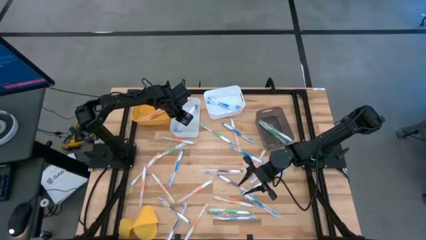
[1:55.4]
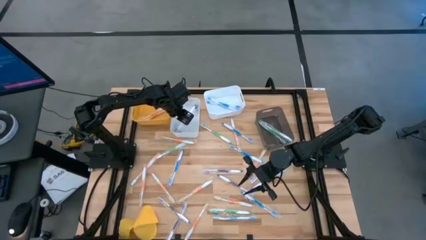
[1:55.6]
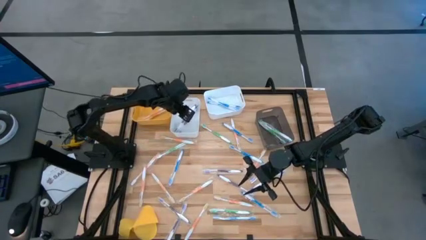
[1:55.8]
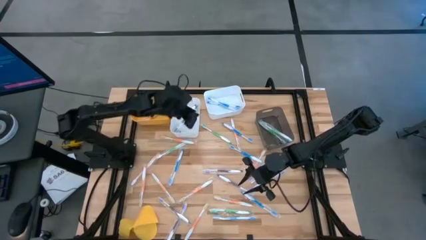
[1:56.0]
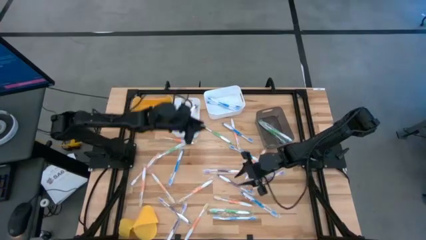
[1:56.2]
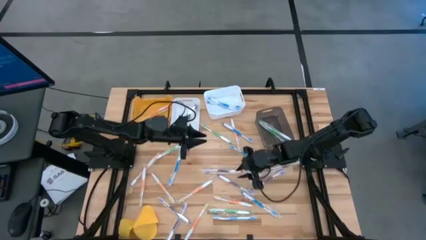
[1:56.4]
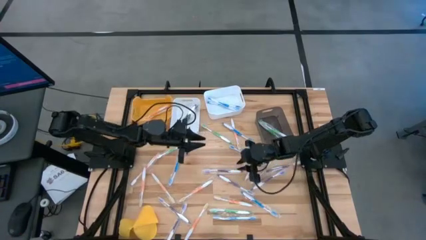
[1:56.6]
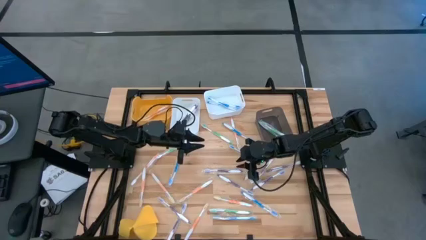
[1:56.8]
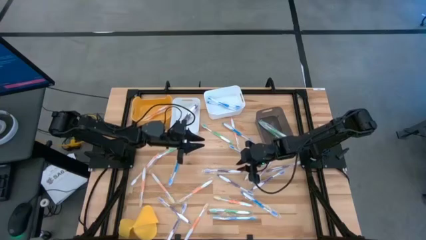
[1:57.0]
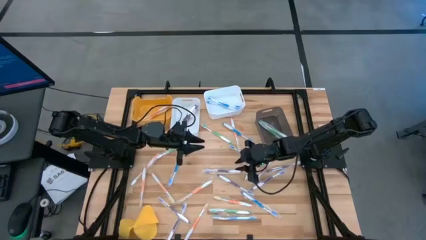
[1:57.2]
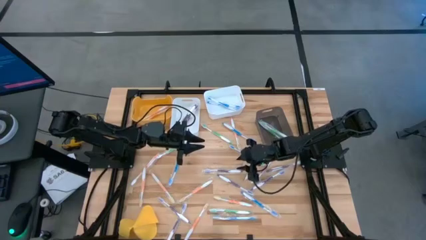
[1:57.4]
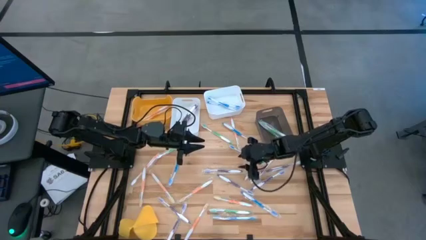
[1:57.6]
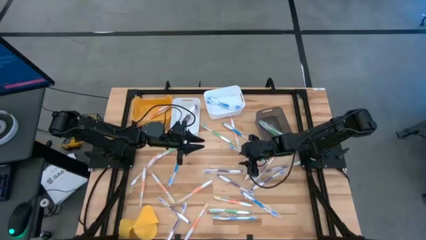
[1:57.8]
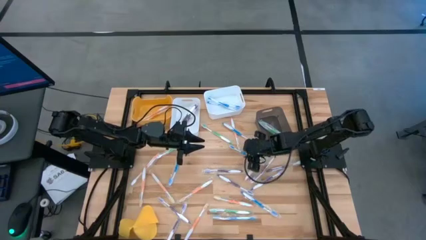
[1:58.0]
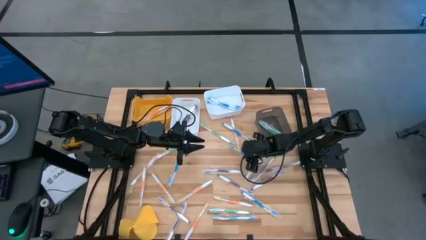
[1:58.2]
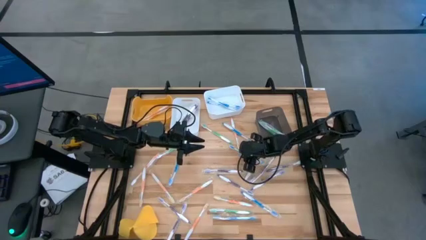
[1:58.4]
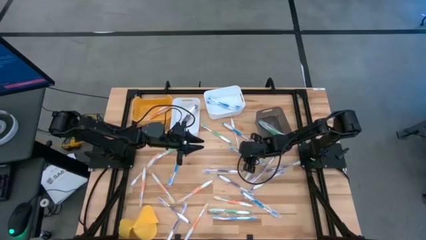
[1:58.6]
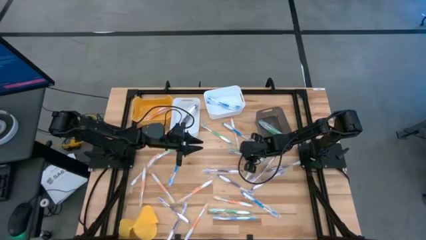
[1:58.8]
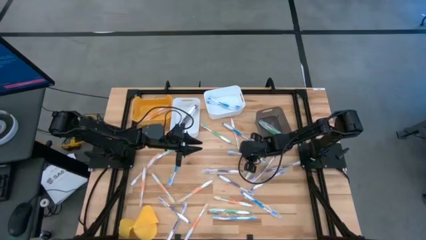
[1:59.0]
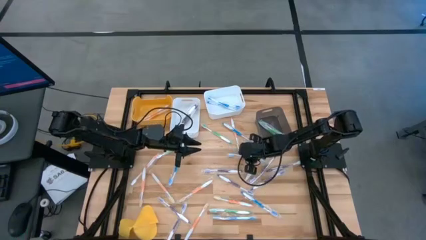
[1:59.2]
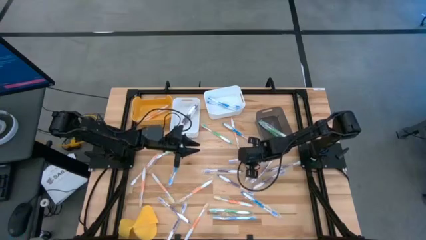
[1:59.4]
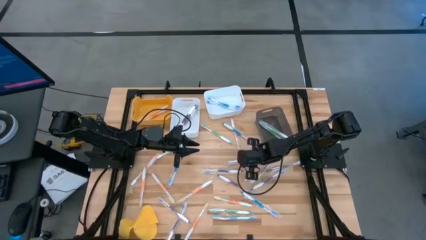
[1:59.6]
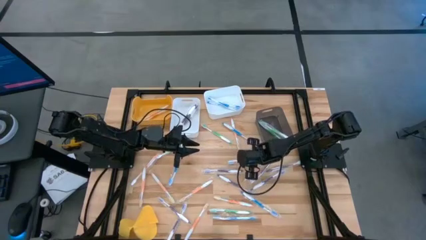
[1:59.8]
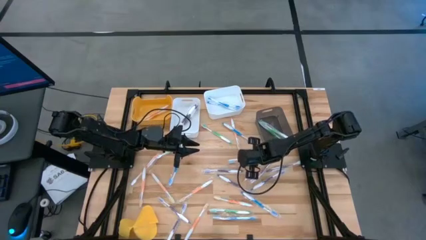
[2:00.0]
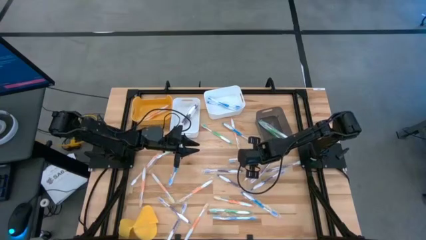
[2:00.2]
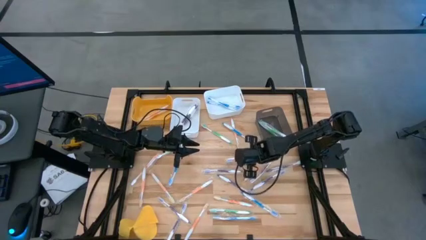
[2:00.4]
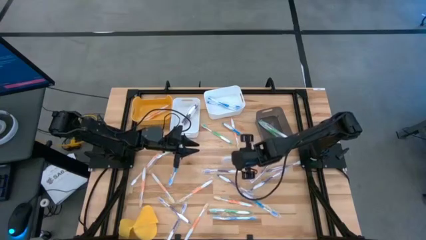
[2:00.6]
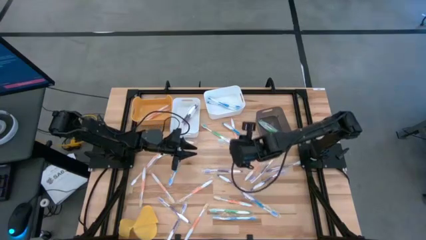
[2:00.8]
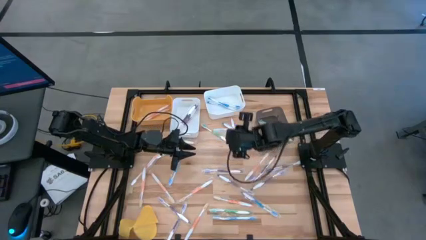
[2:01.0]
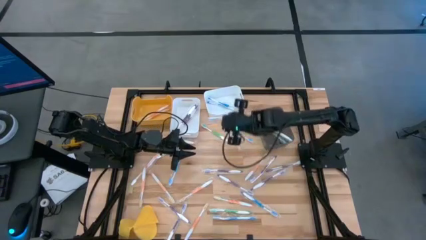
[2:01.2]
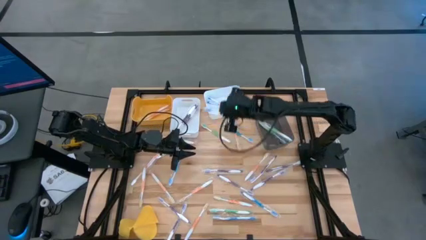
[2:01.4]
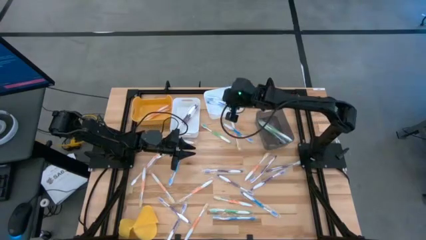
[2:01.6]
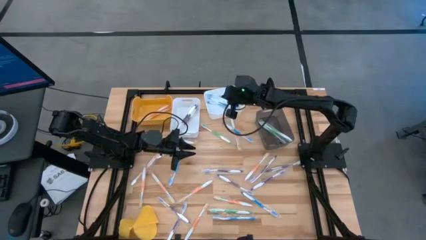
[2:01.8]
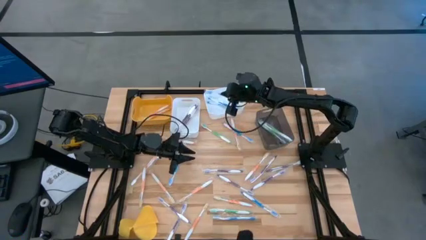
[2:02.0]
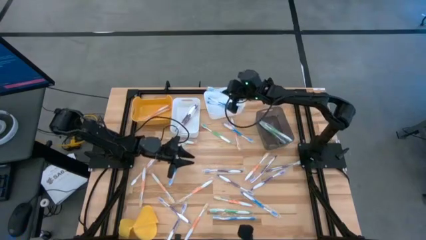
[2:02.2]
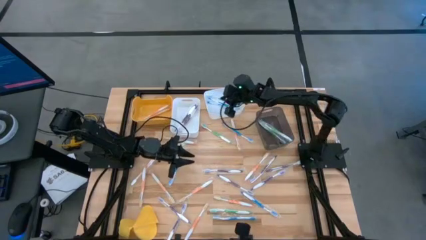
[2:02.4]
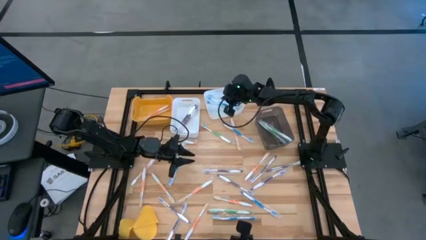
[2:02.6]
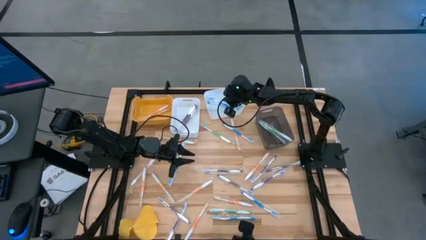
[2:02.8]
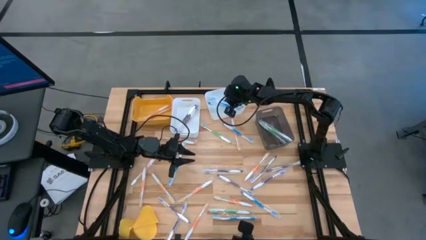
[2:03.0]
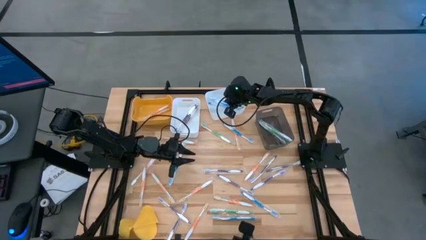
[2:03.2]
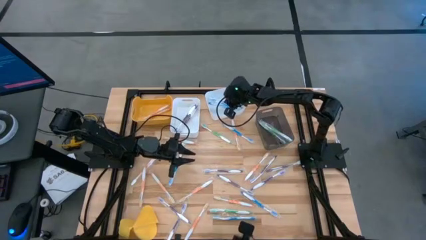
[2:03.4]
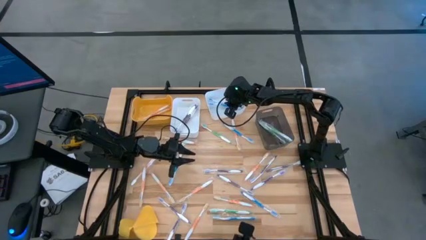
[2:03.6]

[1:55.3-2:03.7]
Task: Pick & Place Toothbrushes
Put the blue toothbrush into the right white bin

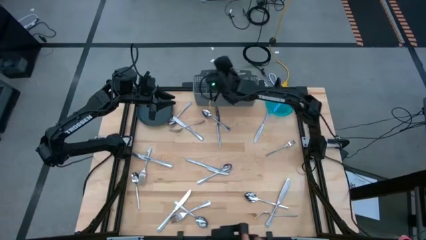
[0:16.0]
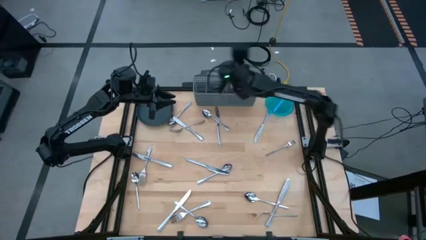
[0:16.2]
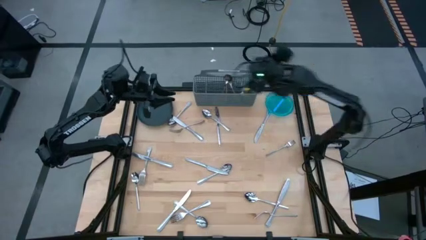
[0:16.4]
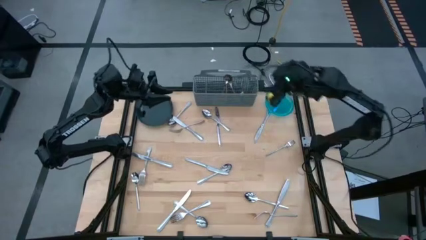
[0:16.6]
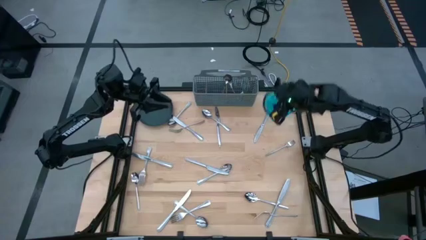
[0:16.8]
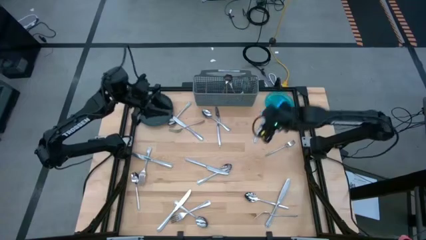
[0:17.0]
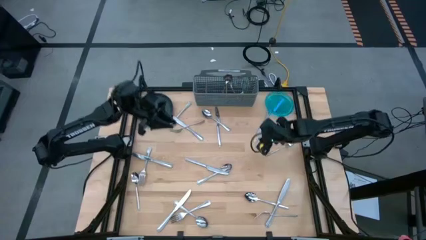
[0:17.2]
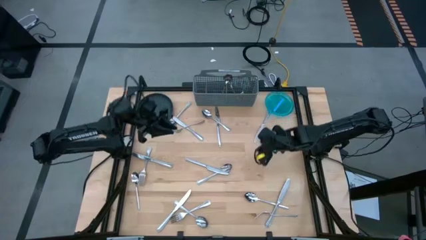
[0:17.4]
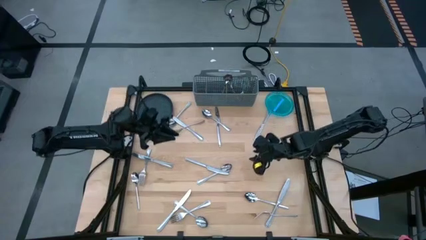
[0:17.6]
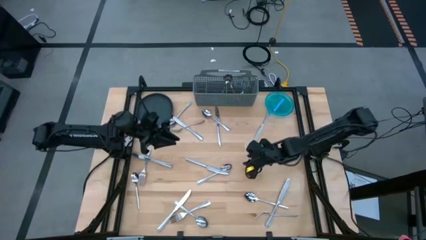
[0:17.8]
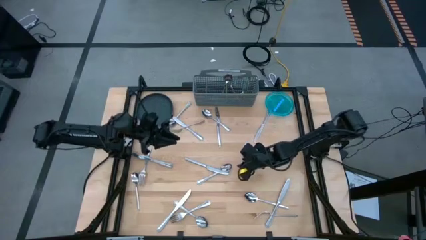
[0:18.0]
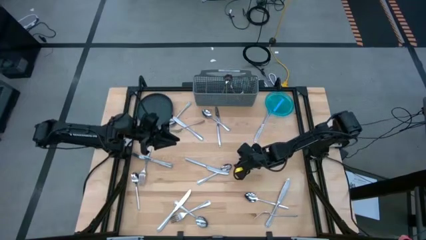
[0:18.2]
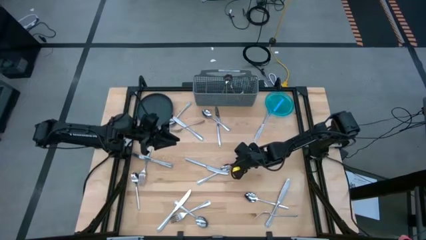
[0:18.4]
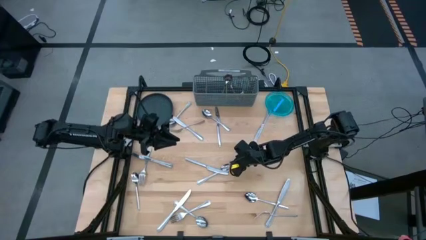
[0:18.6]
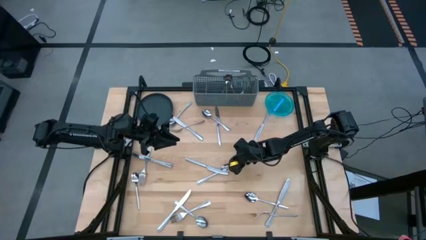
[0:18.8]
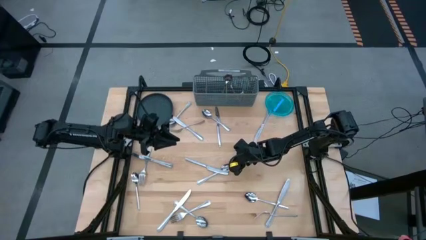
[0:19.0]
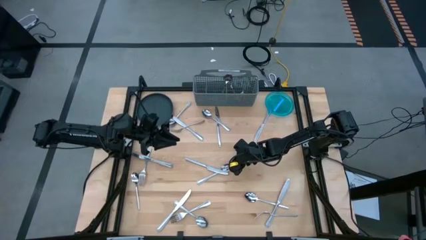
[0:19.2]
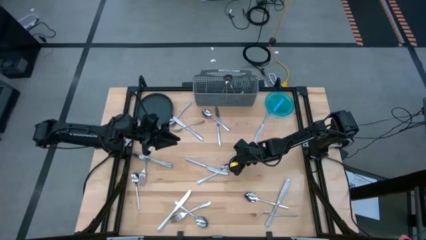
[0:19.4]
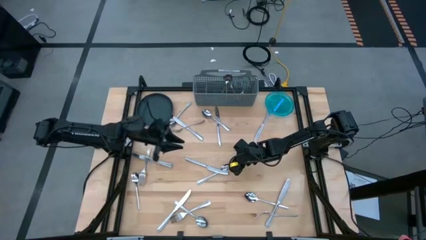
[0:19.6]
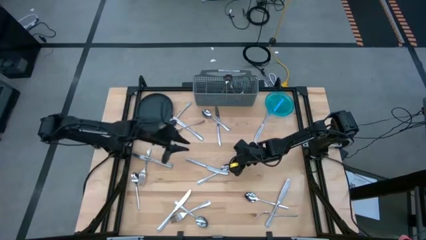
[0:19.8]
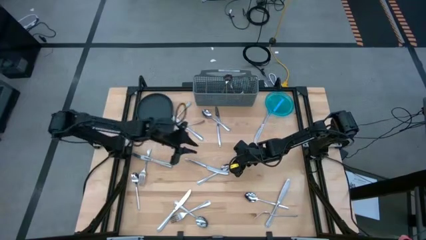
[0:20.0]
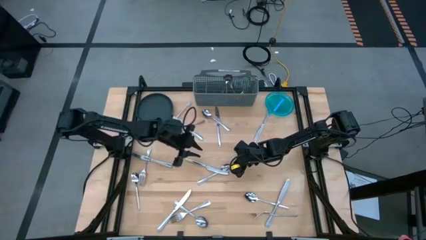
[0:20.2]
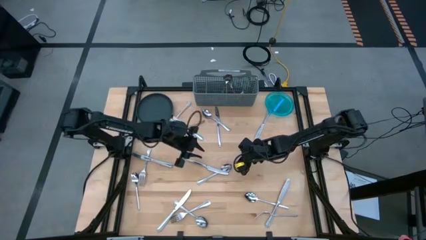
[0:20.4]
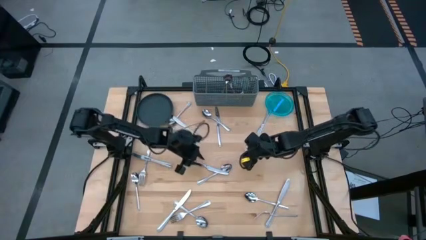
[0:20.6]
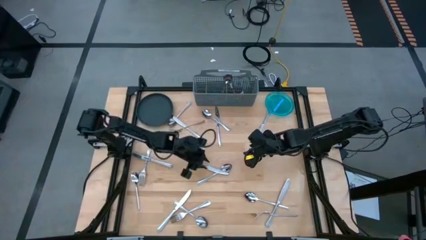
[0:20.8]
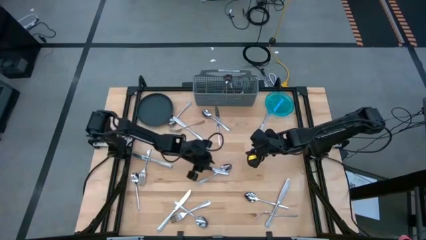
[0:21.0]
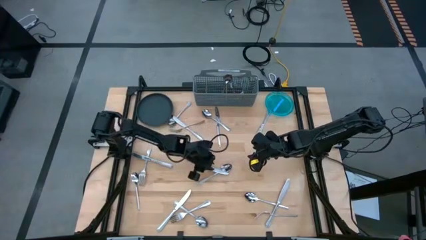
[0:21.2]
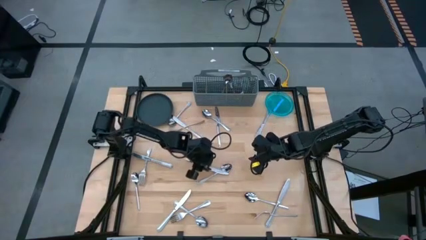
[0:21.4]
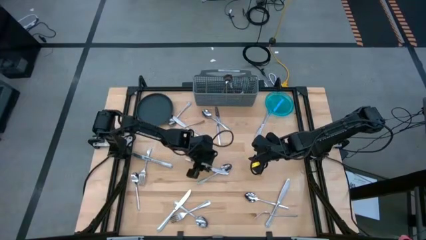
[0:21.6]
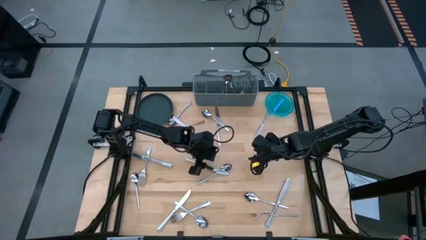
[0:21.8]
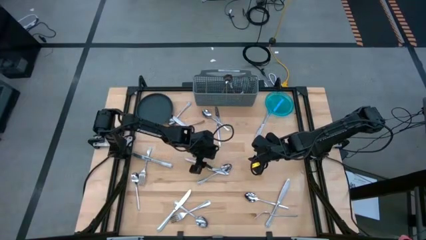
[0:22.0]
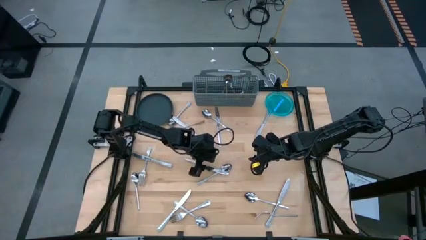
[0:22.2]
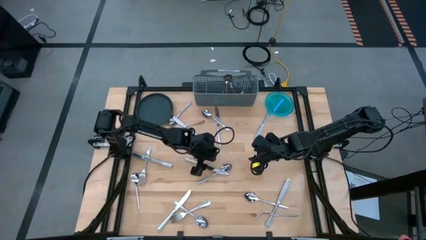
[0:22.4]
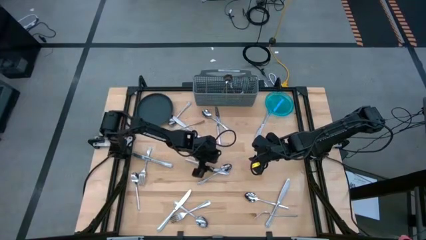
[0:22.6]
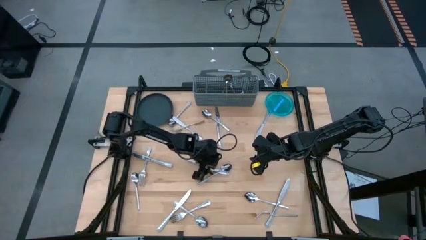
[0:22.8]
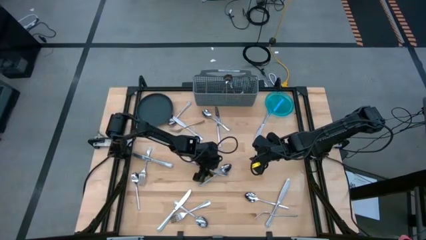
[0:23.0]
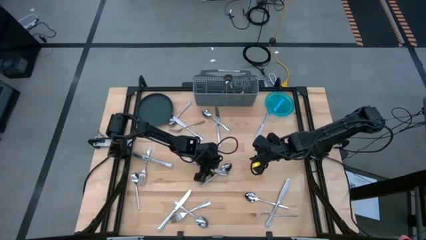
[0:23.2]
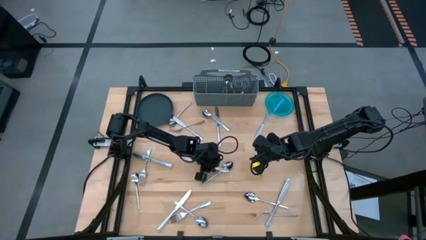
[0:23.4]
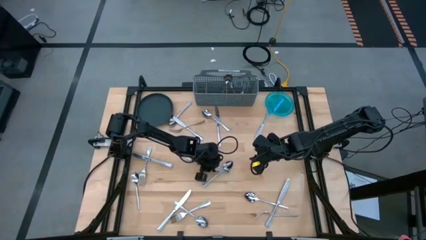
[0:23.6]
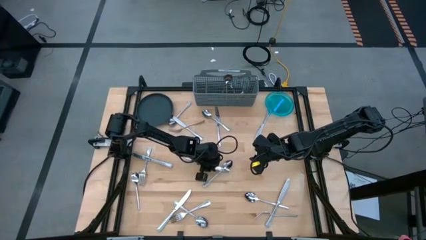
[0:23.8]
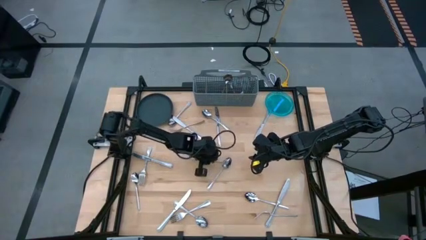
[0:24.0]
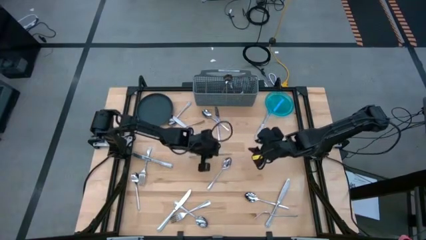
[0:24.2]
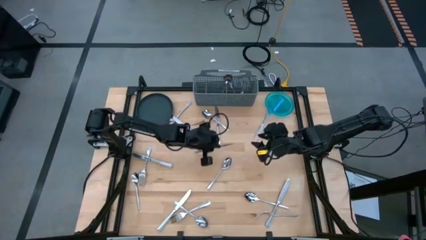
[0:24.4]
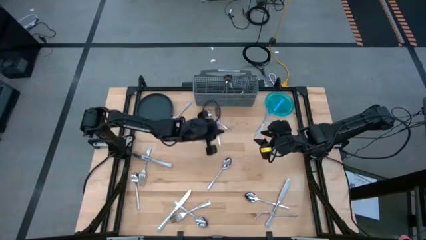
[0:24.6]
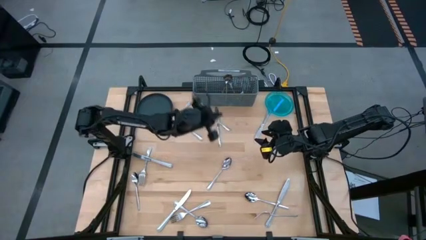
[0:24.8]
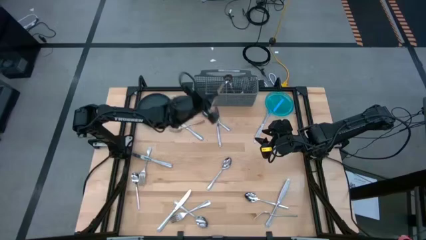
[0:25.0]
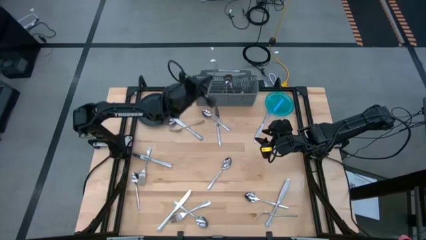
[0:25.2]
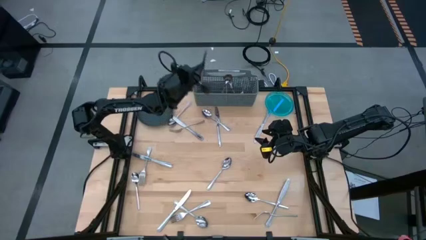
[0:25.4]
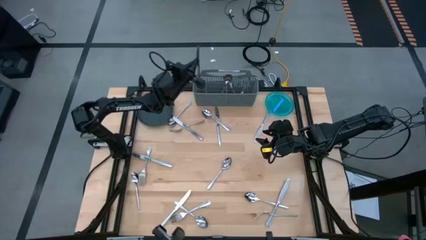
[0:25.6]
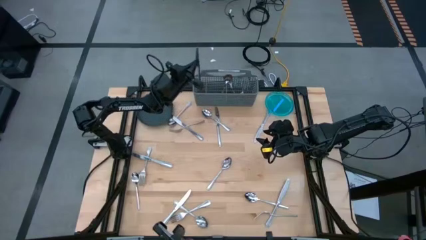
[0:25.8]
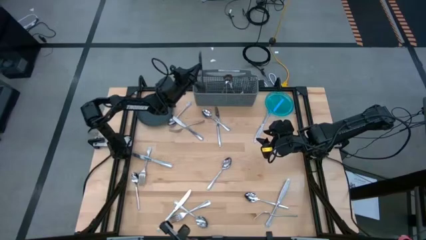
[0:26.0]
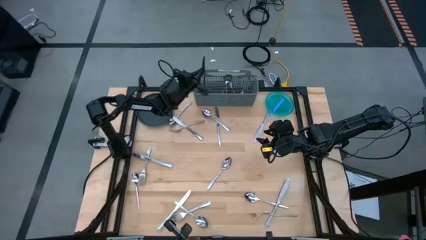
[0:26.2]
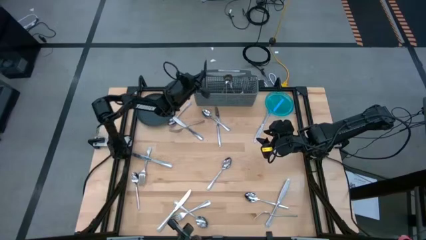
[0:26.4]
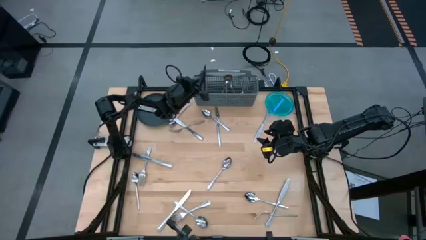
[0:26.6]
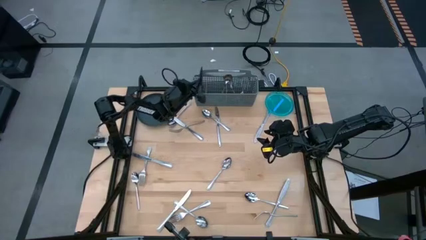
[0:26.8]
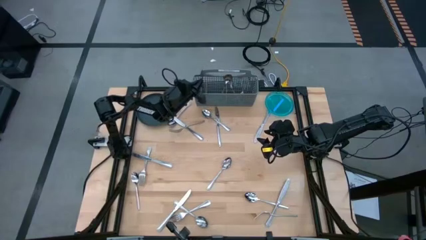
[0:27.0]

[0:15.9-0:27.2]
Task: Sort silverware
Put the knife into the silverware basket
